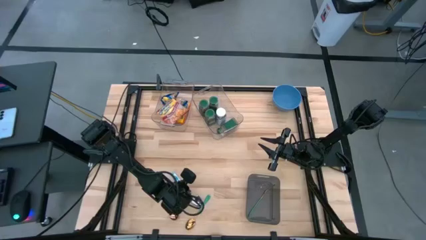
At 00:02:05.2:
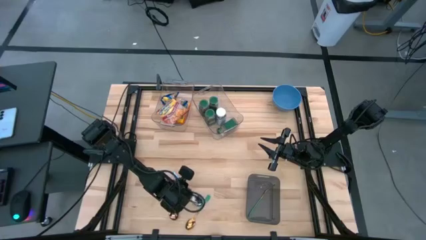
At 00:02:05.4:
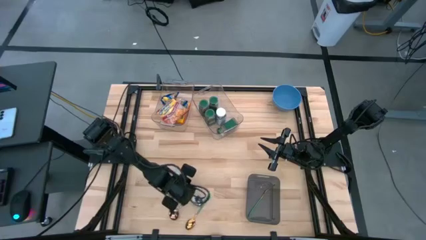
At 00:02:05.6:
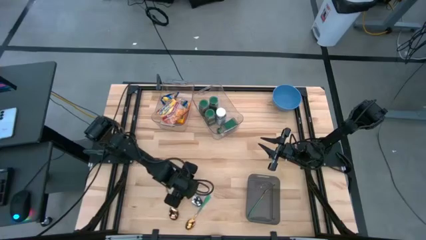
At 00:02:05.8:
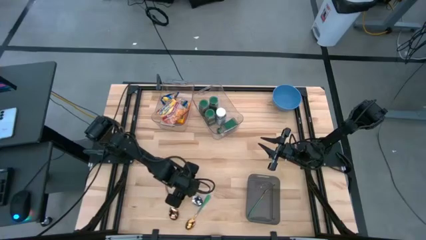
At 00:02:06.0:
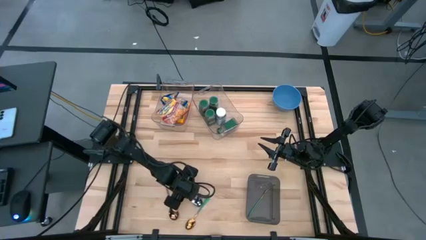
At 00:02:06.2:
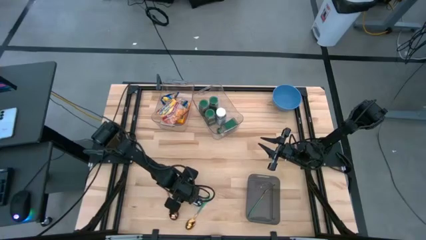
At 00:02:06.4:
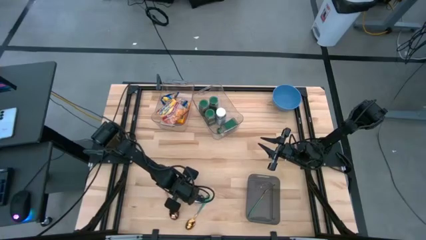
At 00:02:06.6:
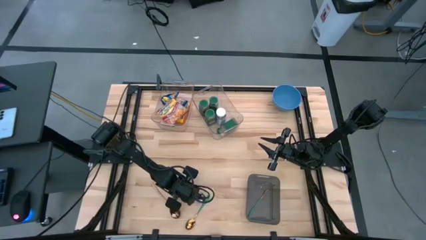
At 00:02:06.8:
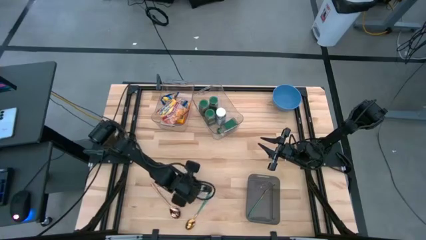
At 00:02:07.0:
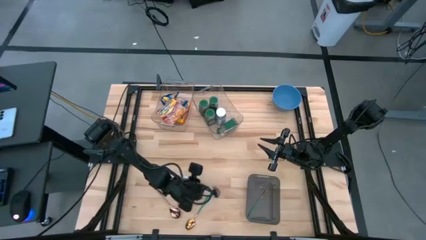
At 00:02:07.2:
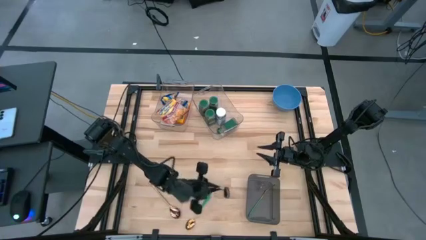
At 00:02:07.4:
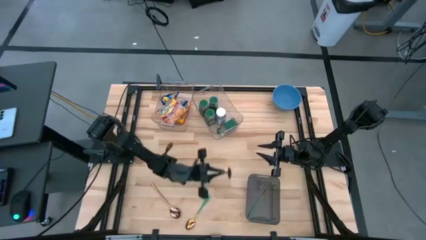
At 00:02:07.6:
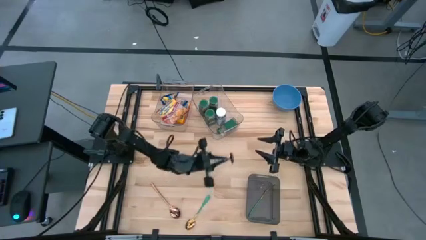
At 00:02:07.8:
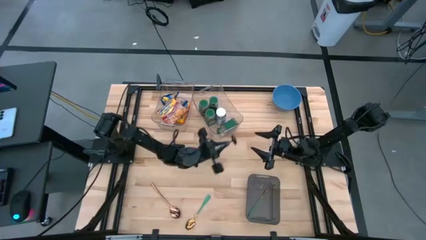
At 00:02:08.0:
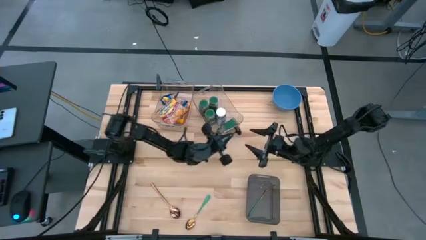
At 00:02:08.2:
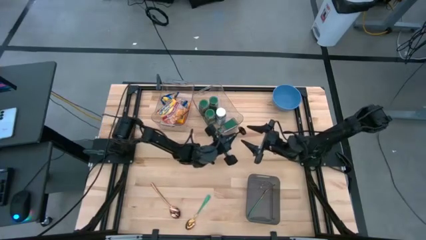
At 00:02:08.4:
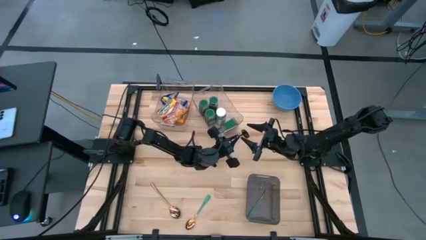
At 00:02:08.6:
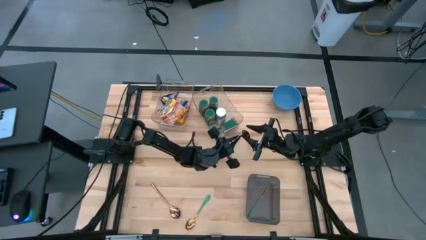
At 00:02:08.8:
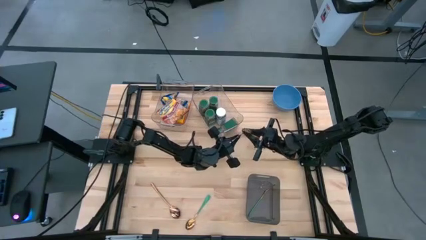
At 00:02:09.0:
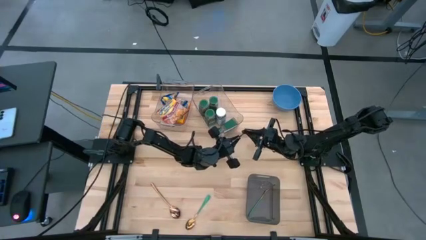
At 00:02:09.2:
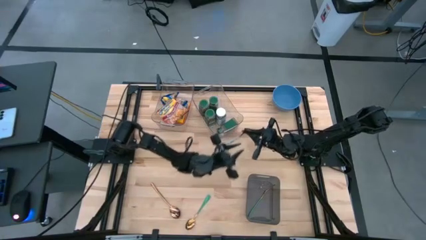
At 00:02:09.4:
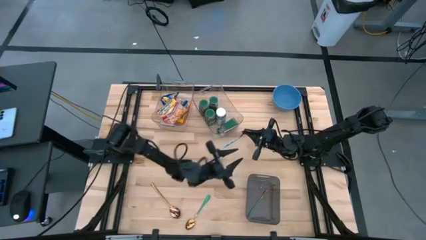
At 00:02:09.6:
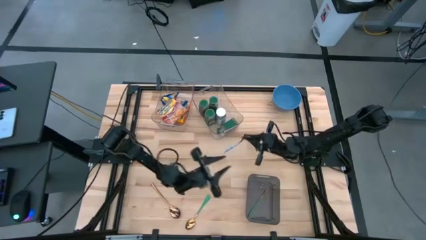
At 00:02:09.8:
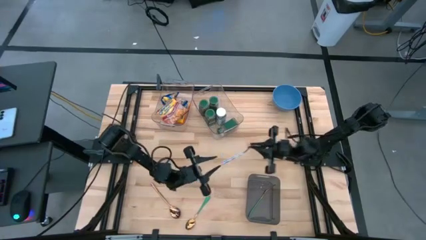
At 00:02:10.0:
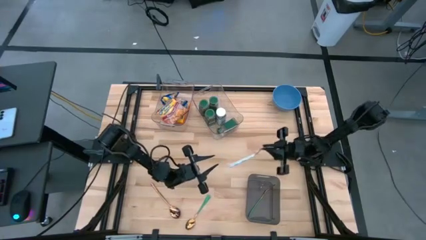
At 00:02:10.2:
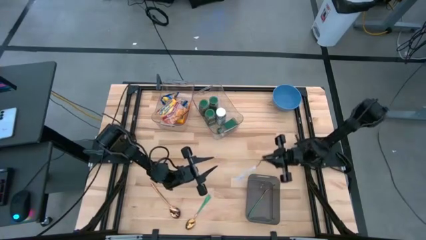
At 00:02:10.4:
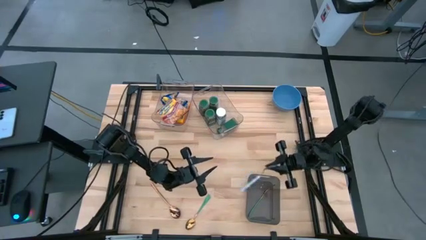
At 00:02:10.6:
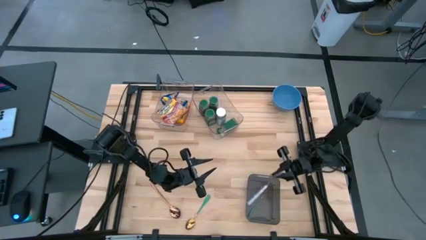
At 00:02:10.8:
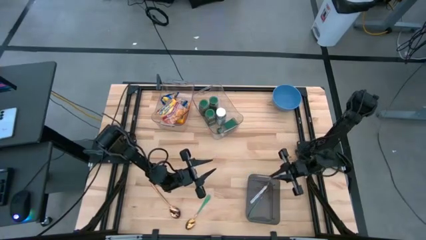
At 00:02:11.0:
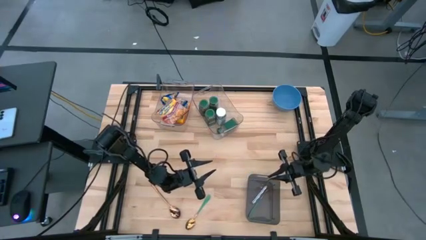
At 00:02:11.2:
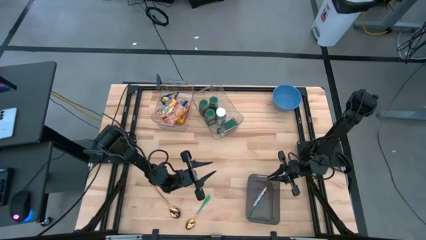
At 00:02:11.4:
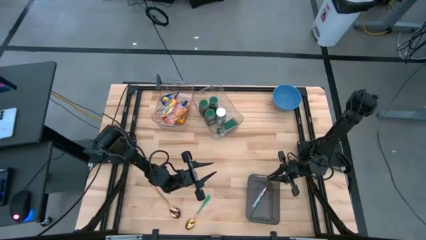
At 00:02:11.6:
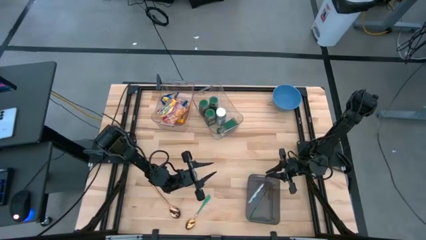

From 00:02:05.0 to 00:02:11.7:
Put the white spoon into the gray bin

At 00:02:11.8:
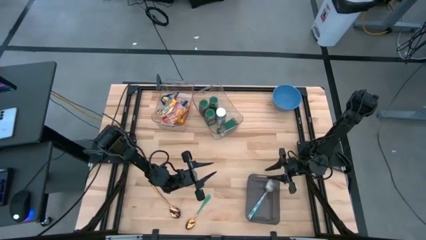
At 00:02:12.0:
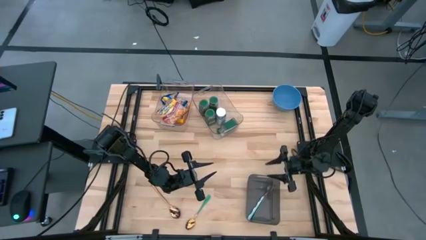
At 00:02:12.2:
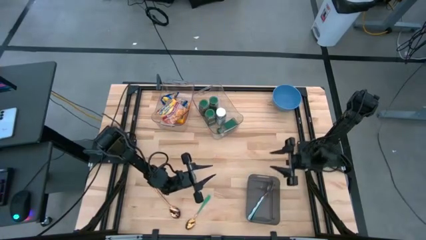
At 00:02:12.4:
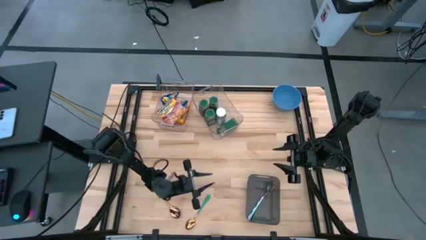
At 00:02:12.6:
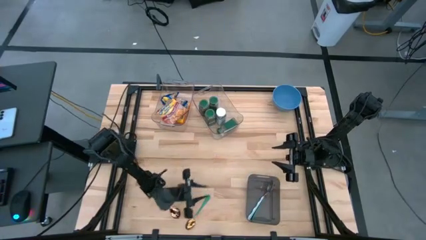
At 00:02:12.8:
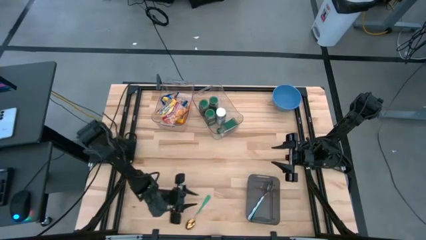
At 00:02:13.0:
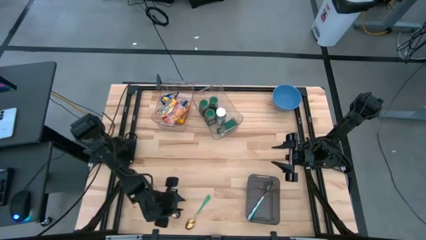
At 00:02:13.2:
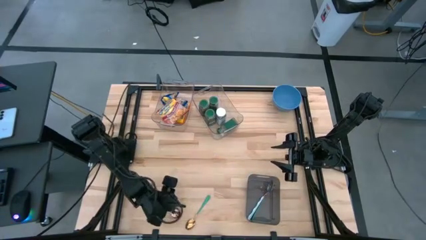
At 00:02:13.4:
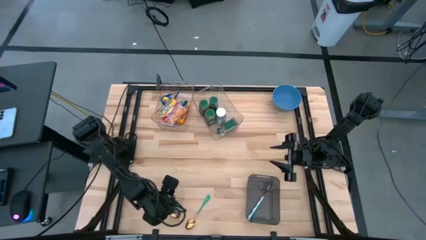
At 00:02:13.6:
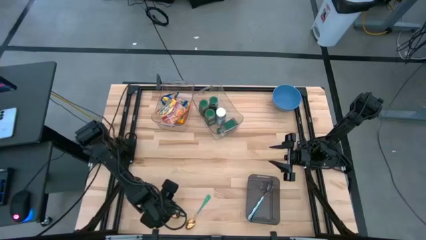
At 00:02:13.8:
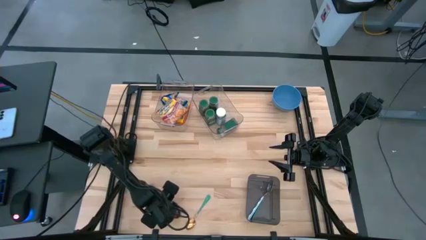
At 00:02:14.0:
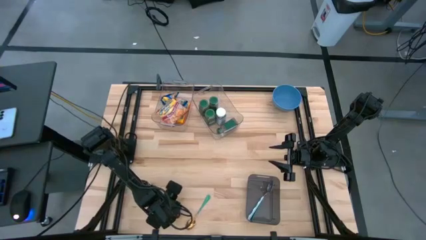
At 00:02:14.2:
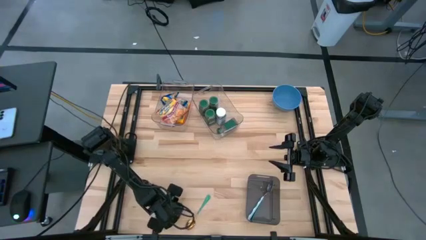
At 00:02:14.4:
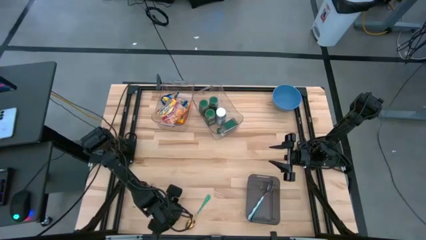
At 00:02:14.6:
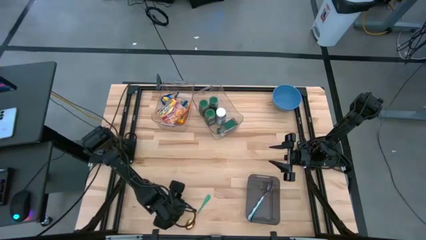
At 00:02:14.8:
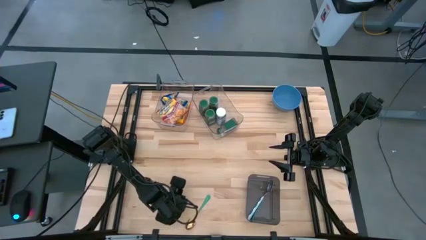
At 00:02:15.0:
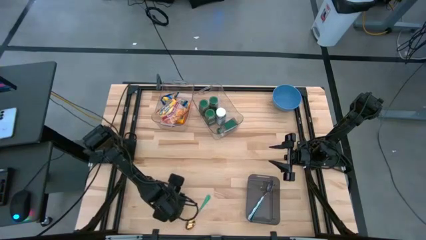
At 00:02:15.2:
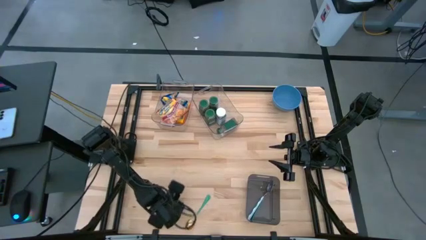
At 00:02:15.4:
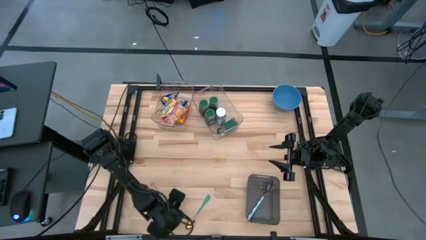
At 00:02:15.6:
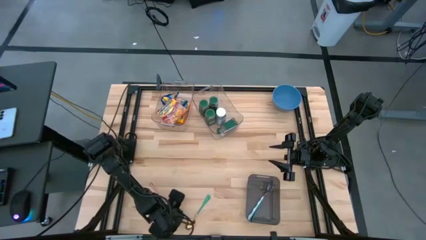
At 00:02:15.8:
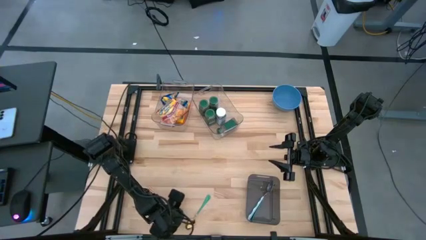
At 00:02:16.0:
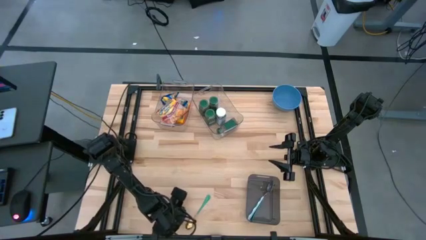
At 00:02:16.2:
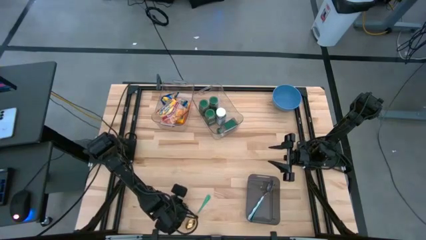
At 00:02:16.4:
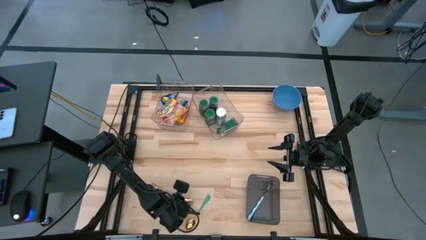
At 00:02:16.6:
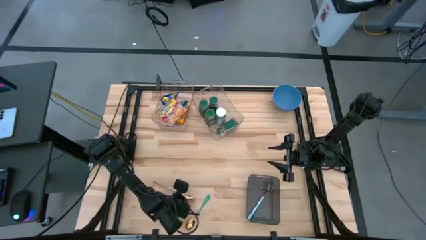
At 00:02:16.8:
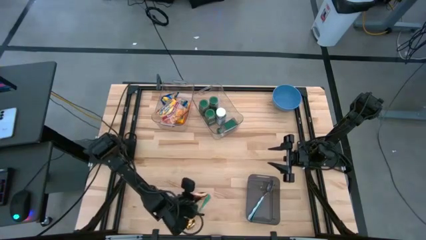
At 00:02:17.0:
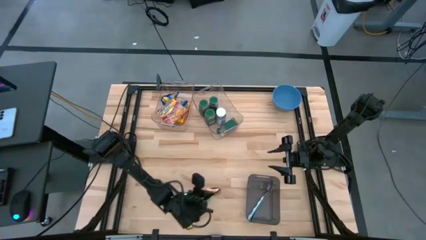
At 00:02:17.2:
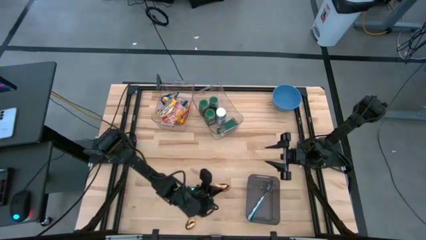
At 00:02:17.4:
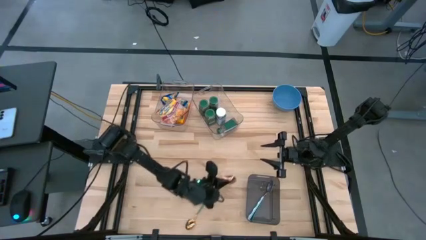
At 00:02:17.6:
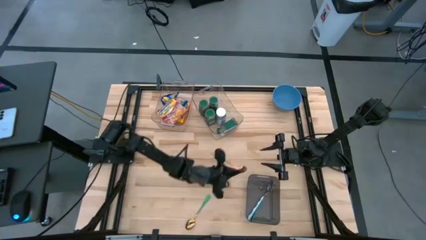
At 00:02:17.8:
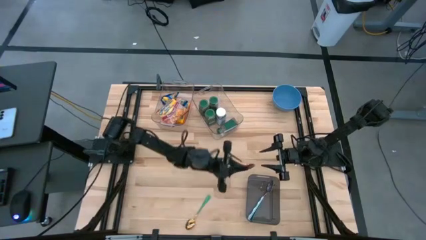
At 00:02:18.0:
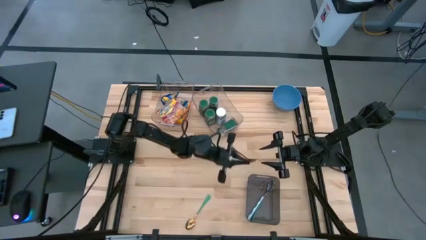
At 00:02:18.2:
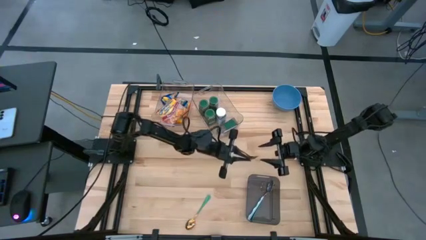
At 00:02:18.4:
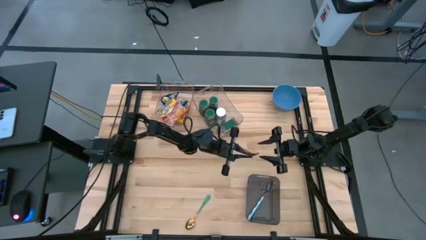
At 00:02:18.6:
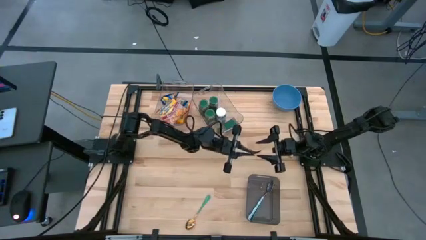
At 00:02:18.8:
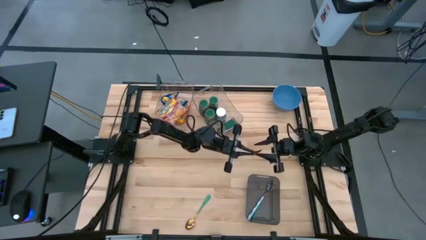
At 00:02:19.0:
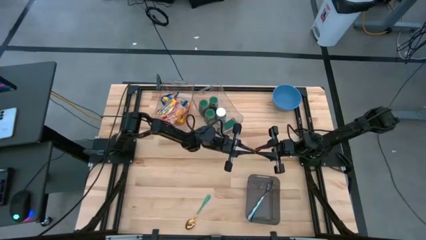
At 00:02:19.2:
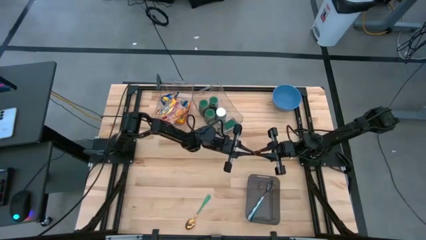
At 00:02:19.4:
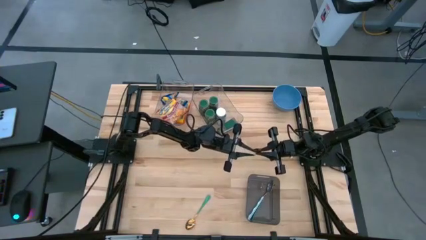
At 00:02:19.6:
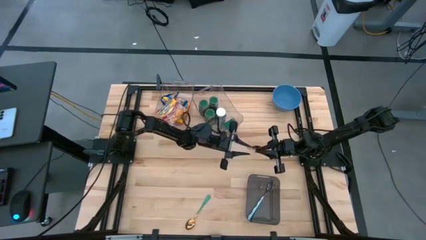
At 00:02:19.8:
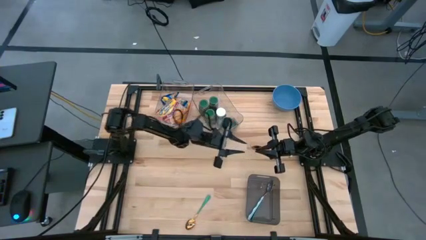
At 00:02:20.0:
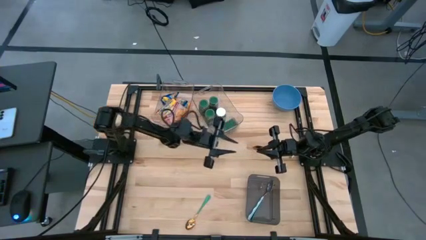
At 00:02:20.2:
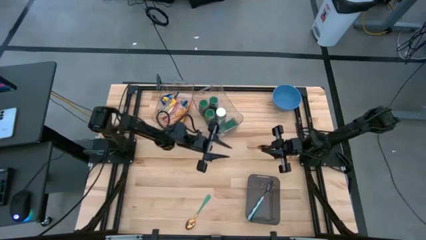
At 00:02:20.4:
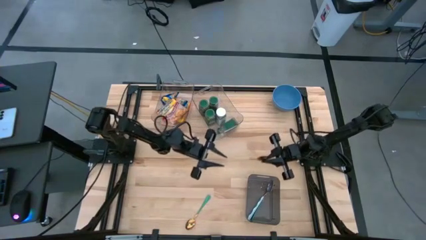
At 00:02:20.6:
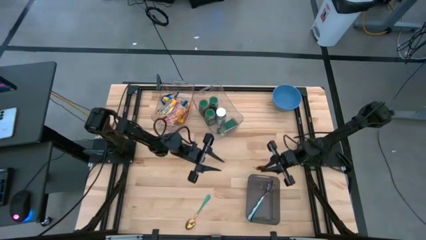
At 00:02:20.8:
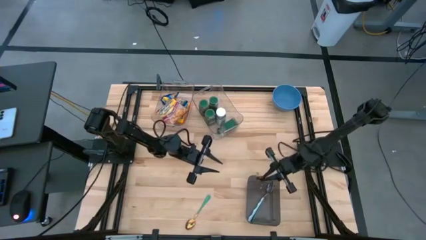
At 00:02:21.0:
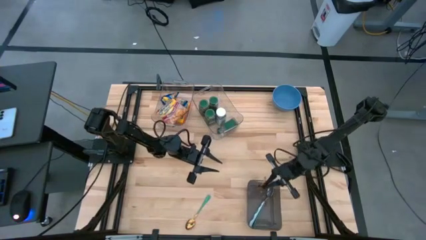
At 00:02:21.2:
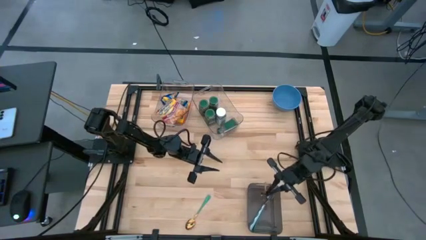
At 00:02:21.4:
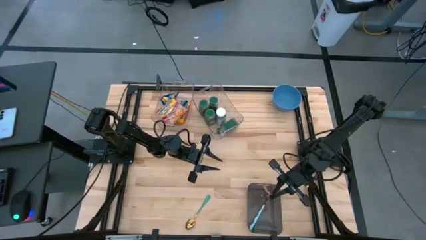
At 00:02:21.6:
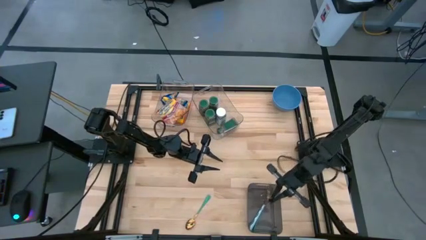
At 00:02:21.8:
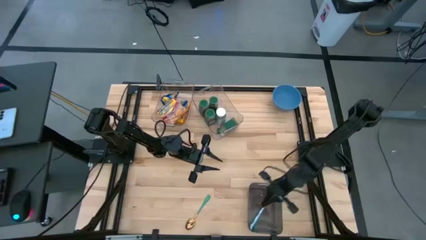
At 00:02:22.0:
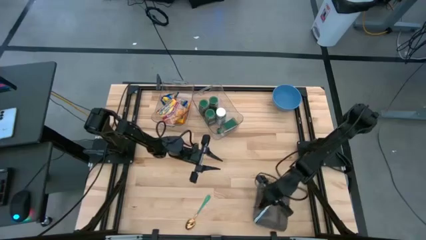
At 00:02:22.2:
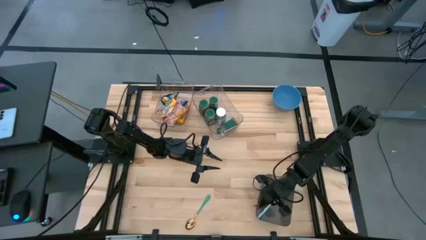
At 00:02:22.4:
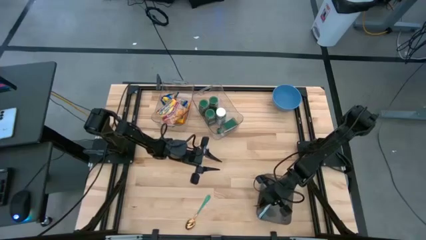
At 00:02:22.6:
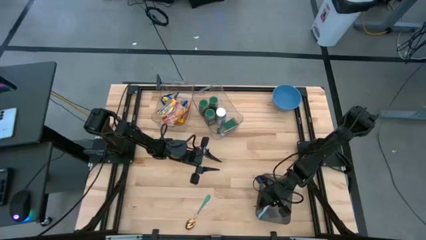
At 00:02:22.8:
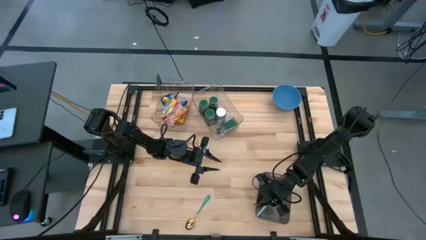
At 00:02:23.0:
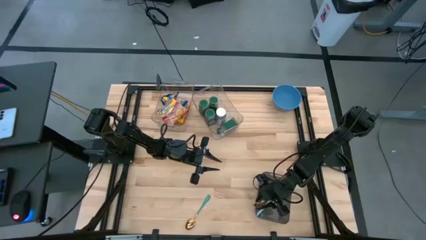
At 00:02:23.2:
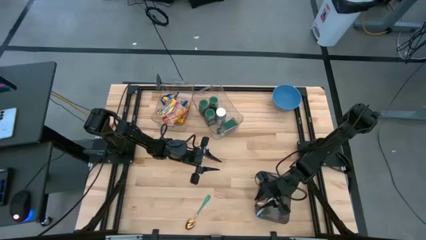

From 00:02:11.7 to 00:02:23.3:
Put the copper spoon into the gray bin
